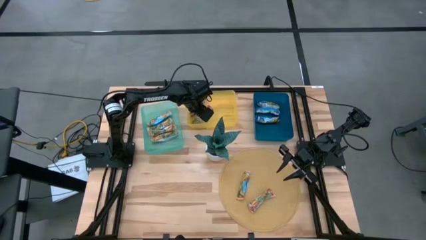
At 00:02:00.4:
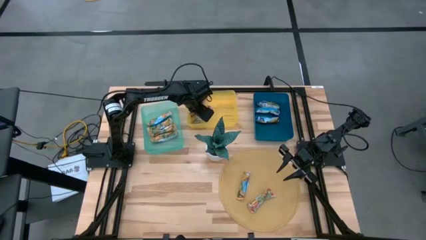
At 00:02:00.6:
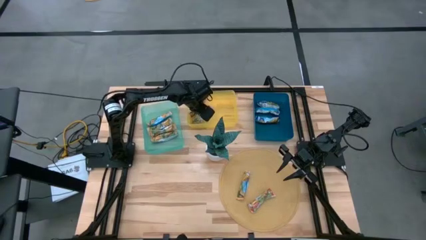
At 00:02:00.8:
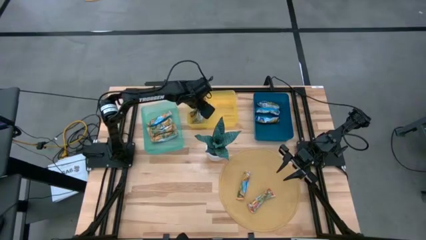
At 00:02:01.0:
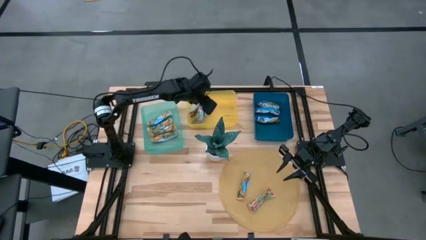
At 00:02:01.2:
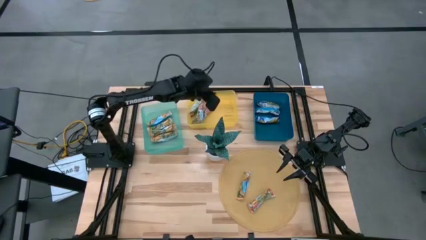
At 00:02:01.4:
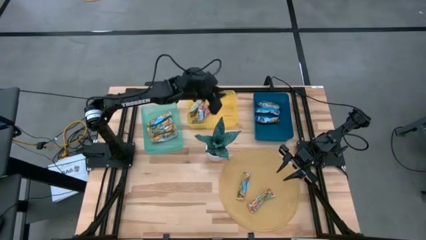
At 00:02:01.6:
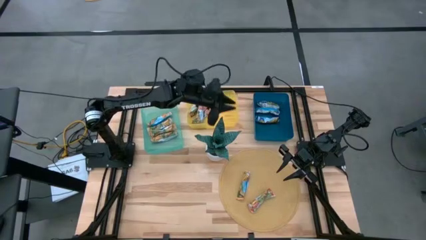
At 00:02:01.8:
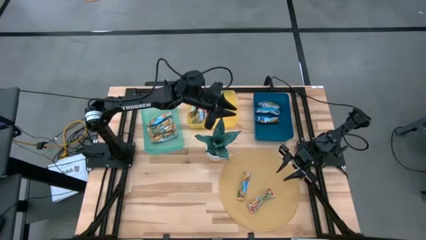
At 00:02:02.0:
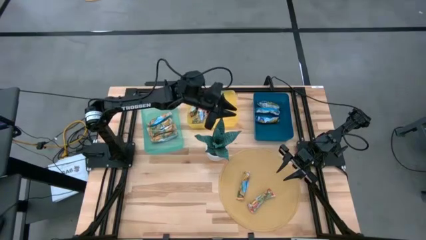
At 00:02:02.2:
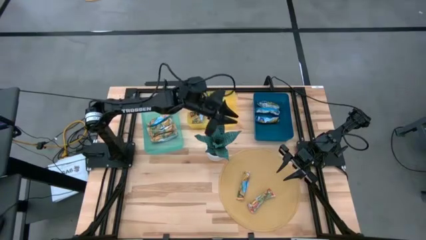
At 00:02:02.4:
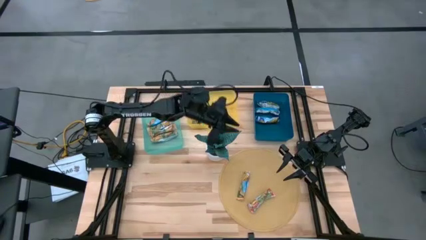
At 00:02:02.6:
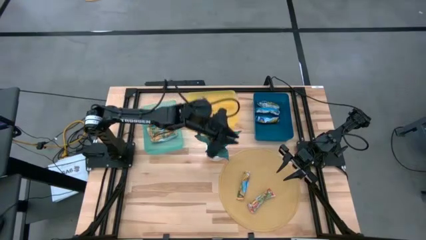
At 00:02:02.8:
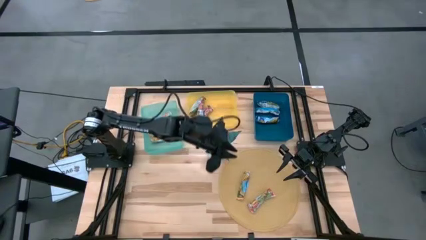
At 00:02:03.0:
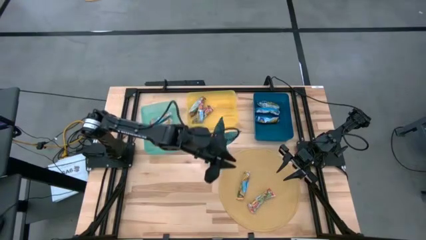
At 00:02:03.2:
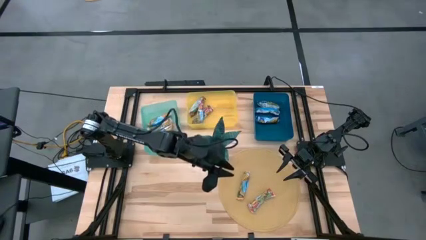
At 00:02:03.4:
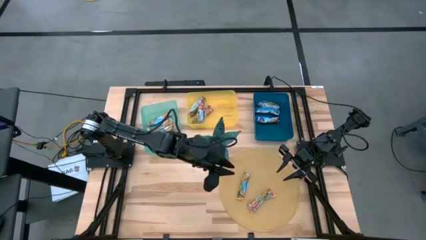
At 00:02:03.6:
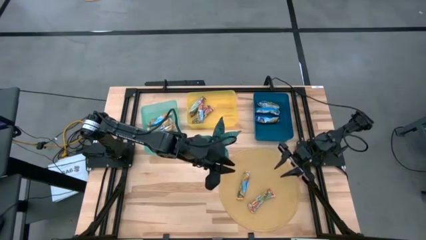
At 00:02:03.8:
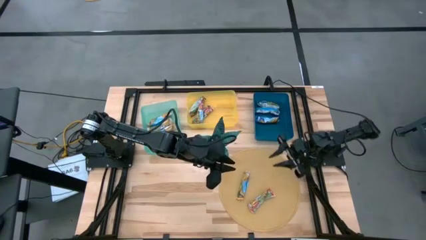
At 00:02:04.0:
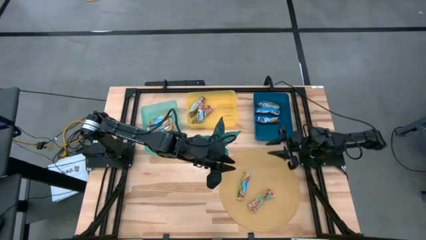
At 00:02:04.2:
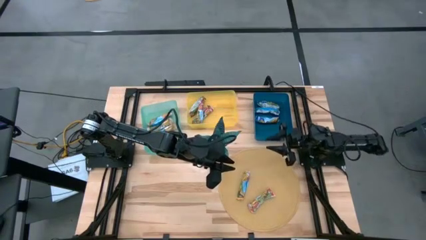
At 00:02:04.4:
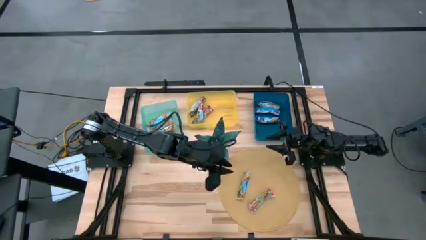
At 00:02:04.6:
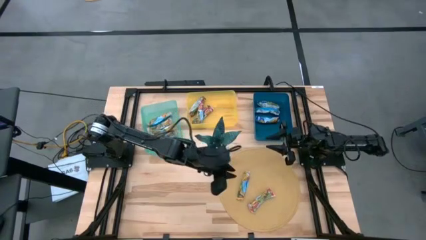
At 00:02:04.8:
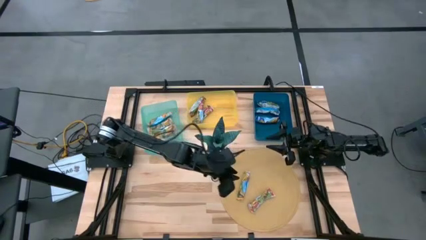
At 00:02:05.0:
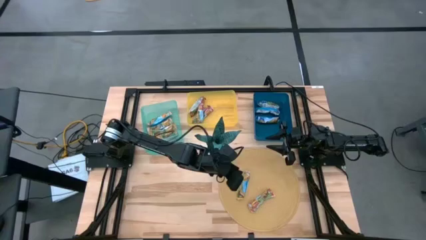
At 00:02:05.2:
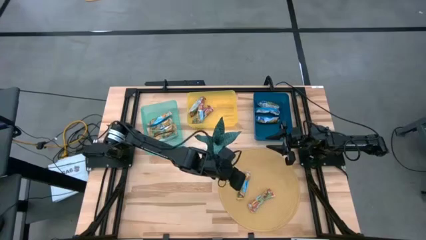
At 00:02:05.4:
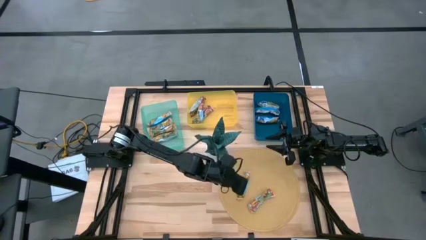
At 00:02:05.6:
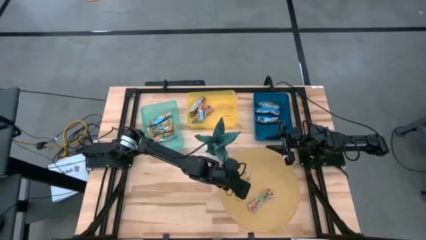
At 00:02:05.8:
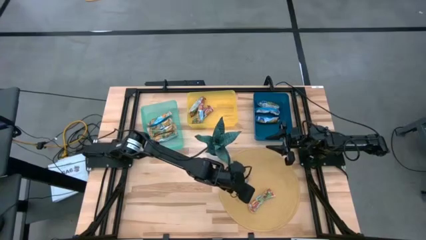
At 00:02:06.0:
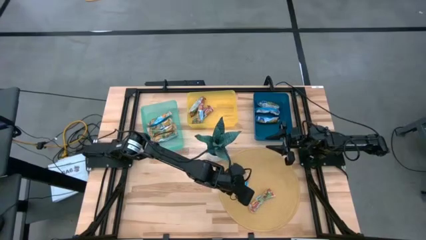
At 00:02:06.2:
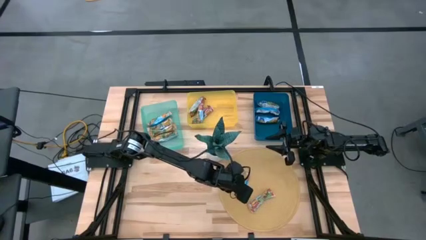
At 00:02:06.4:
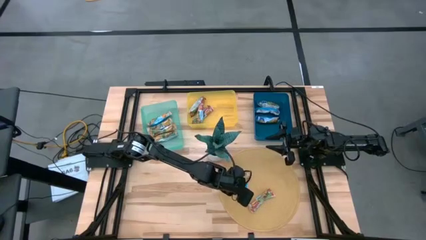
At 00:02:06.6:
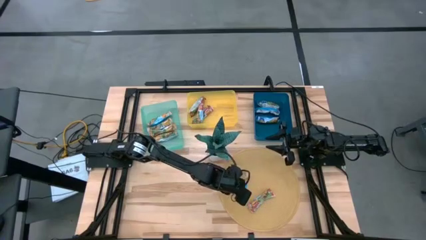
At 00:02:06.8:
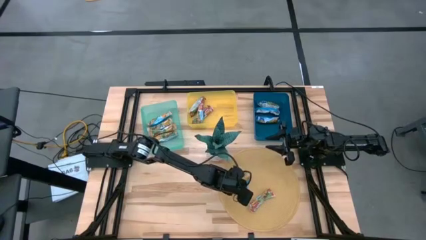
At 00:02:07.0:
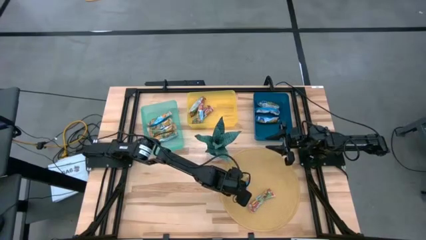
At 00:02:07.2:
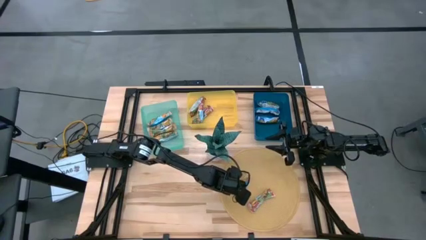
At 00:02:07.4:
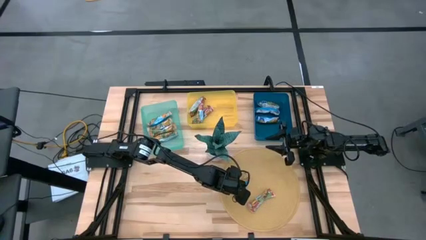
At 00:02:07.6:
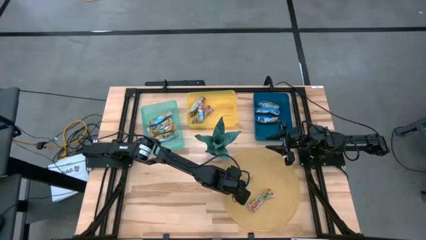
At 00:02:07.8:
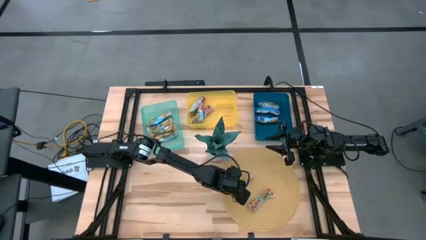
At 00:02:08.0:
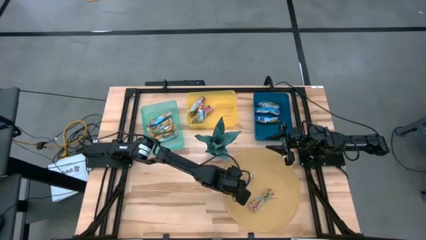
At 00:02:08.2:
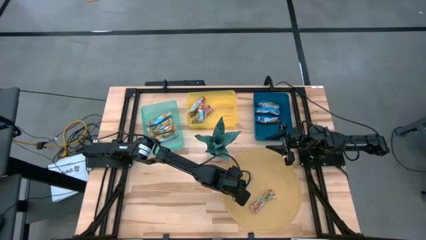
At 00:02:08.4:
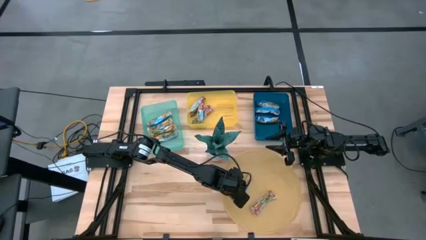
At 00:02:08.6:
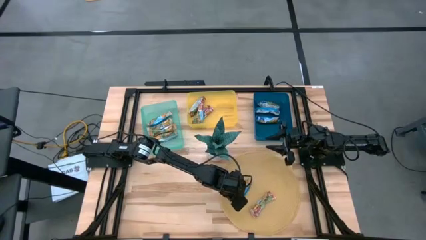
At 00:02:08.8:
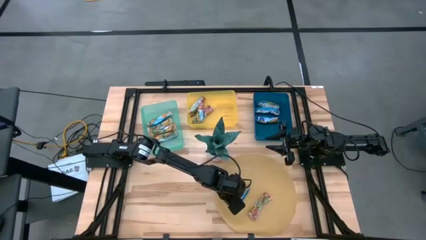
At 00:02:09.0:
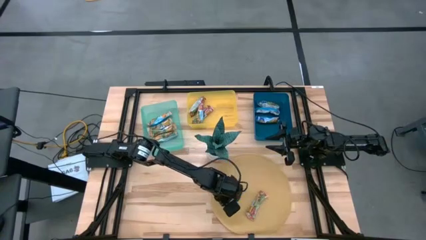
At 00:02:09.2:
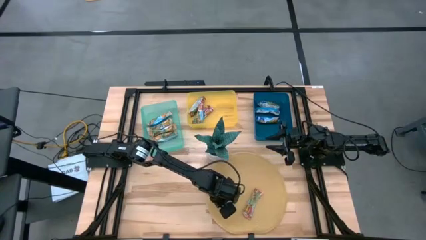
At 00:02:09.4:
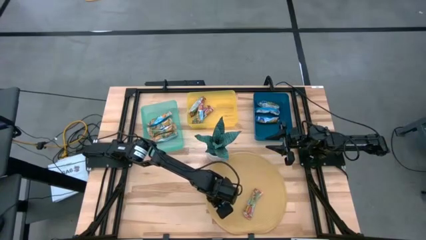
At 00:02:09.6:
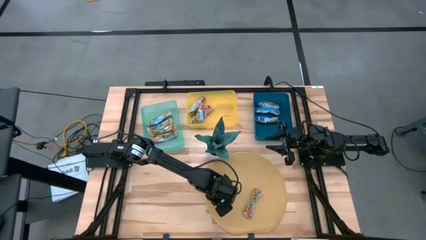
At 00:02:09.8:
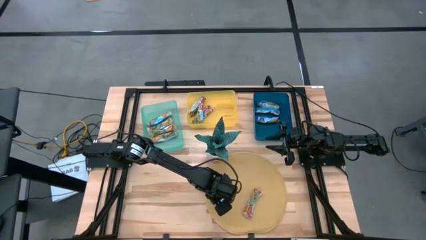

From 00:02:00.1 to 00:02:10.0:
Task: Pick and place Granola Bars by type
Put the orange granola bar into the green bin

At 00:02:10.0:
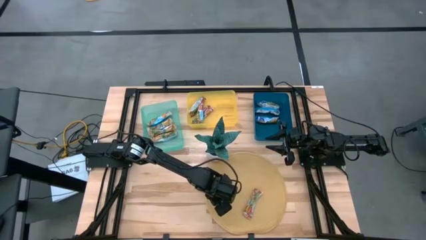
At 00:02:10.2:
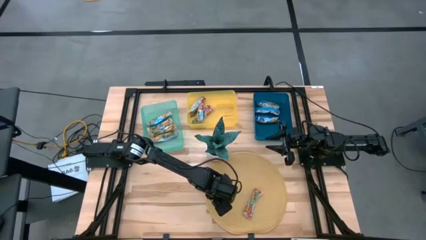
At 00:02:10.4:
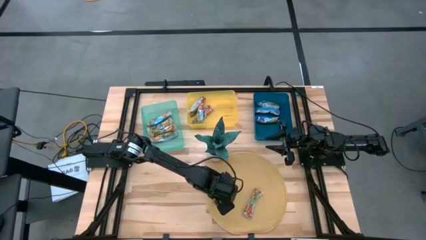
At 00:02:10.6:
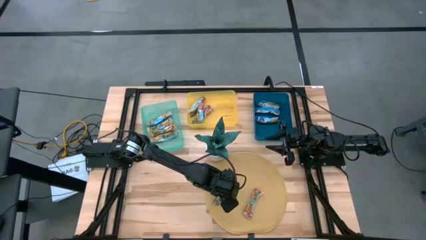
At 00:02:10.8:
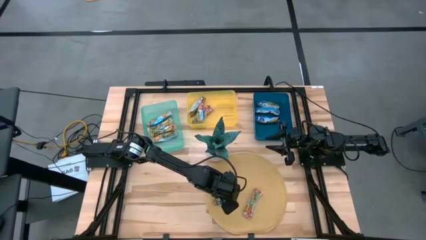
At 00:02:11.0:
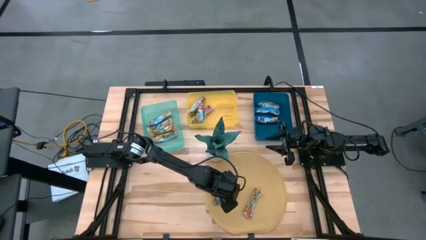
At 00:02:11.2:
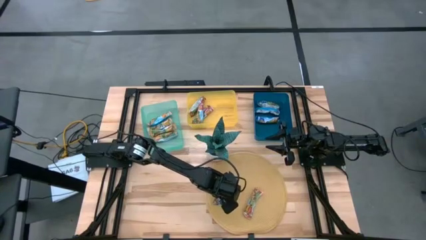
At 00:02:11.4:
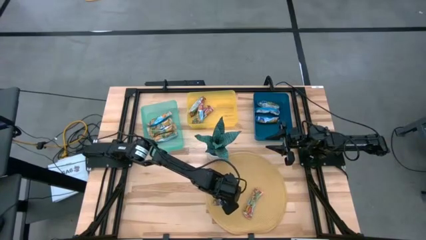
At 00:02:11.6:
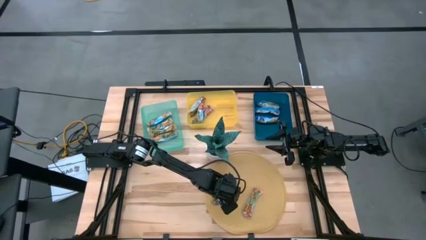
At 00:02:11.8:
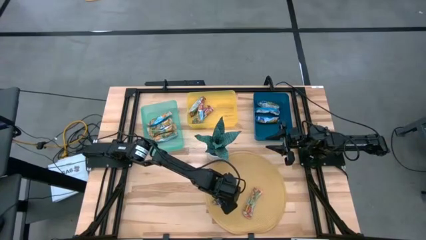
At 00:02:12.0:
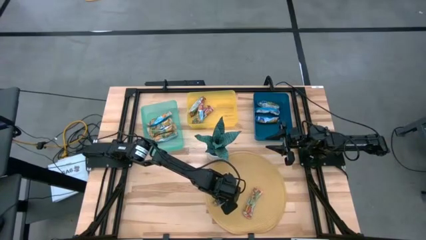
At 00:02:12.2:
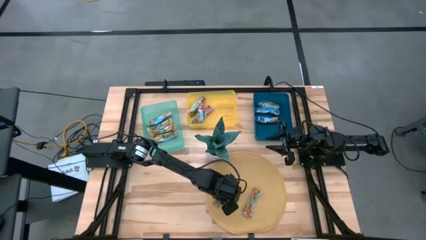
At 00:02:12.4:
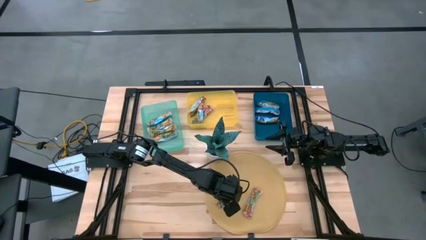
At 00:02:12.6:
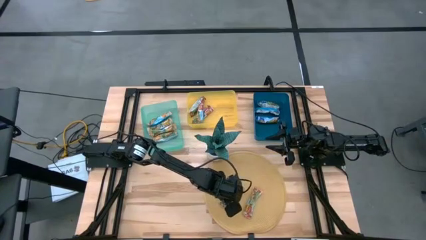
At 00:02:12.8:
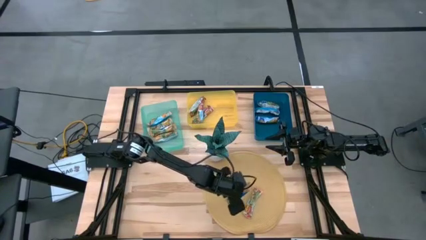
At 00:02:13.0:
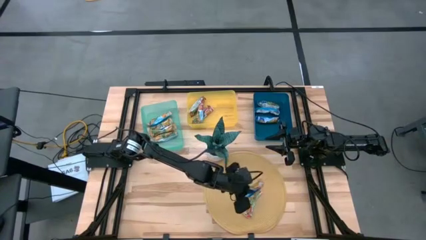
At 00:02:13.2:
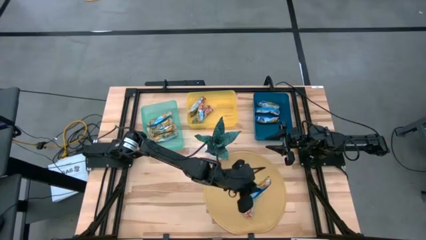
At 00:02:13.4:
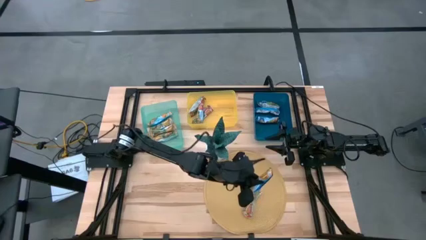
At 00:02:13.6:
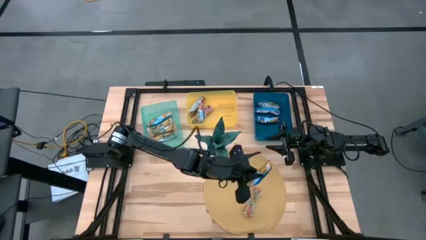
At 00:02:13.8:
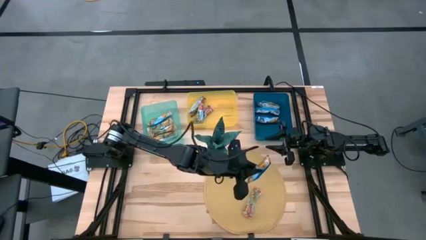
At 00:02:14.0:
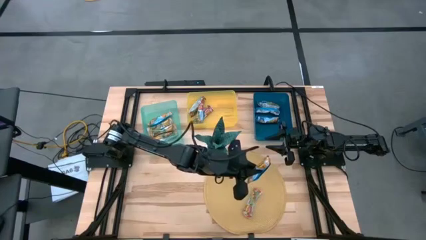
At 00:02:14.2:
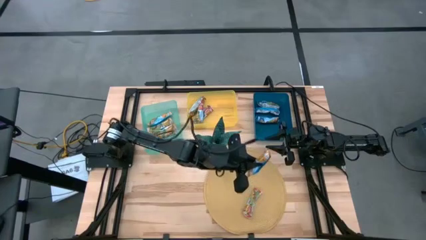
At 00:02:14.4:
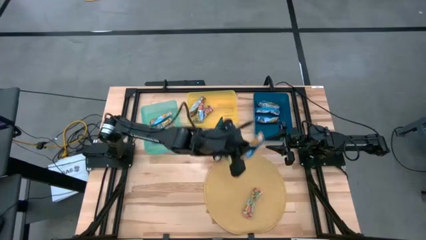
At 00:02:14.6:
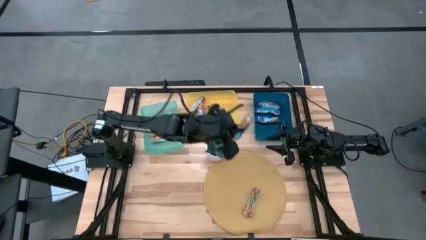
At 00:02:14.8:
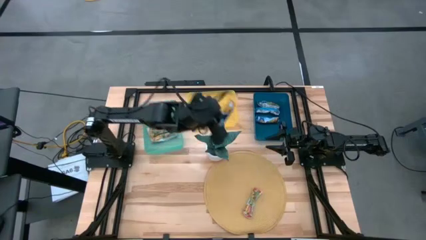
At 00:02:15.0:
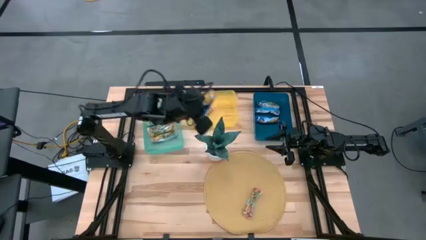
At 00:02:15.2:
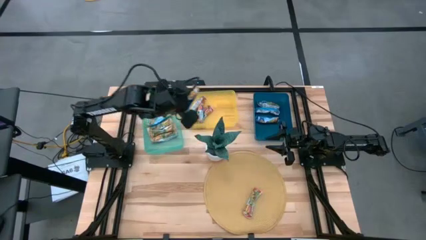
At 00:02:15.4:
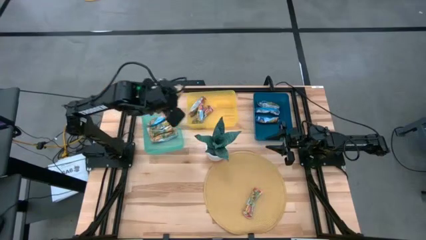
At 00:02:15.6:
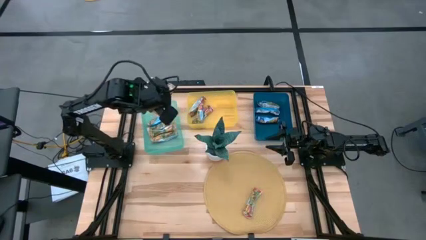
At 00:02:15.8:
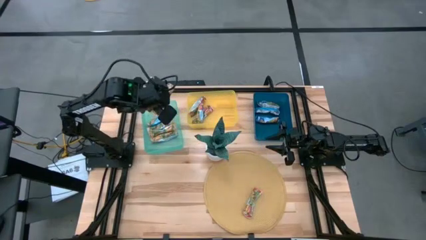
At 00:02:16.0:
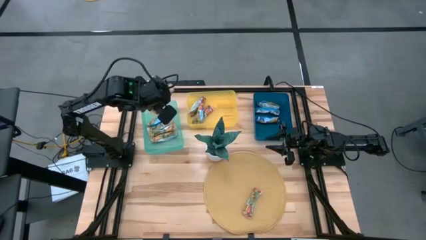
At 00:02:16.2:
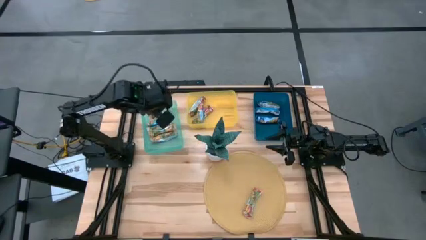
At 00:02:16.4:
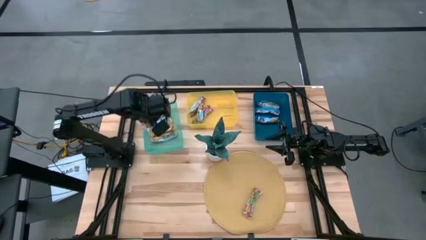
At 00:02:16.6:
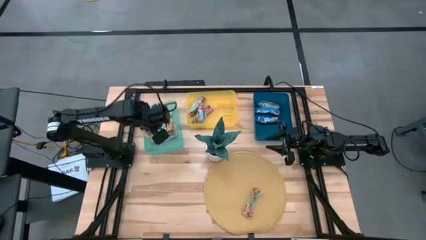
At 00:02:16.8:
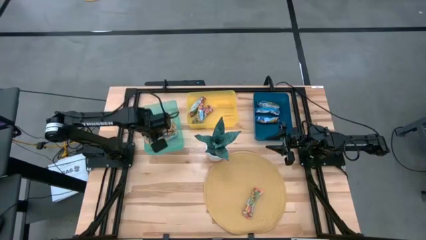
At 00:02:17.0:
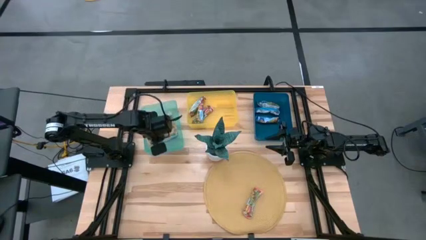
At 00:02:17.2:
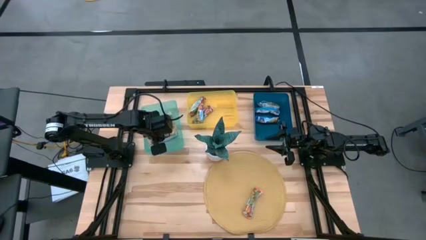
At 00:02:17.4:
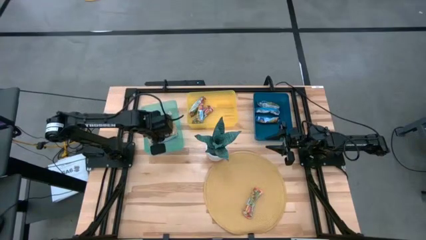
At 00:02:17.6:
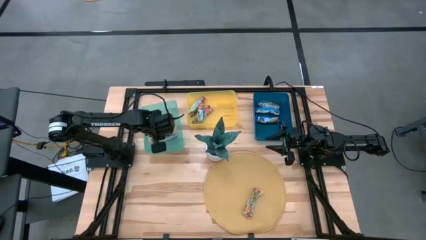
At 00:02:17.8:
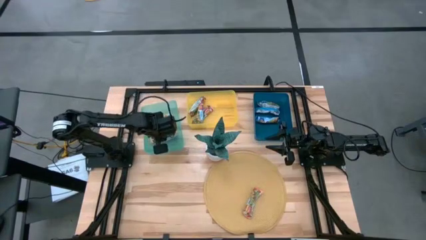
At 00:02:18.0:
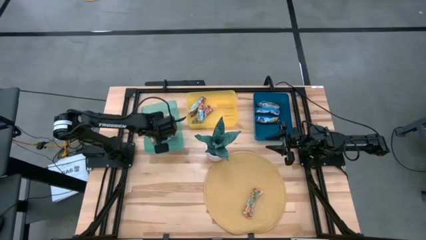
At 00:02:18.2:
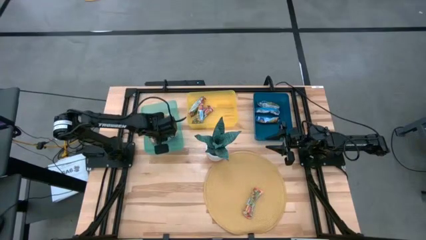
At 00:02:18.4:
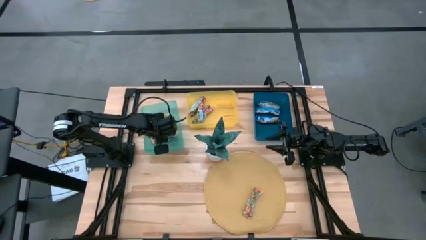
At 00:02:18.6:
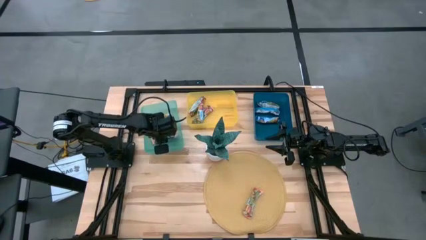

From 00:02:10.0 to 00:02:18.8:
Put the orange granola bar into the green bin
